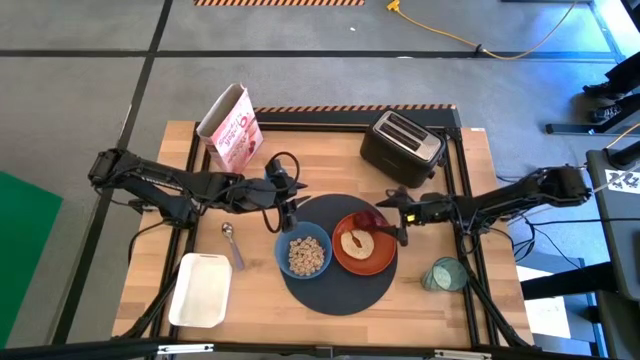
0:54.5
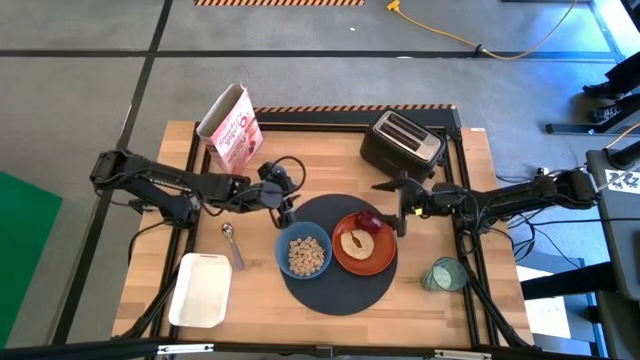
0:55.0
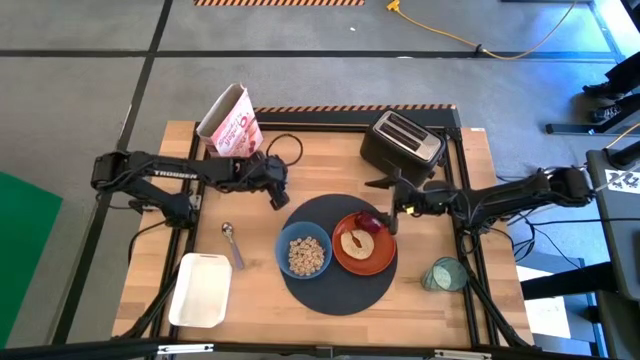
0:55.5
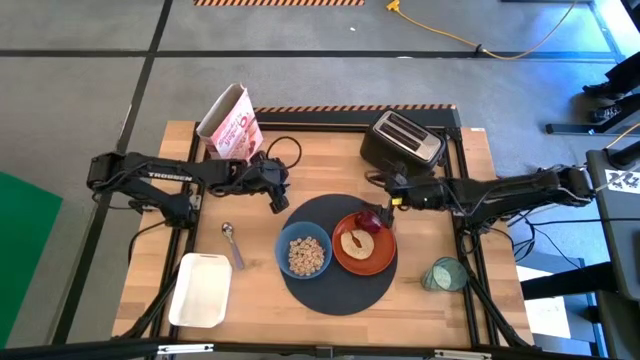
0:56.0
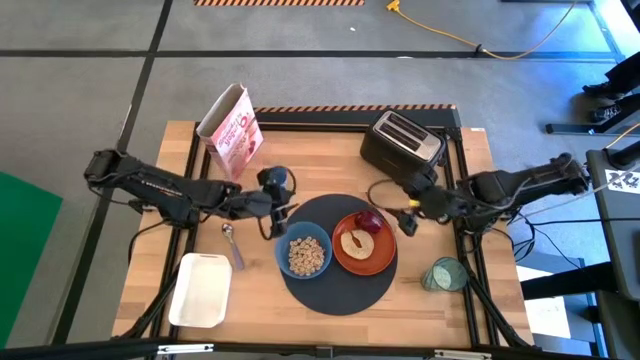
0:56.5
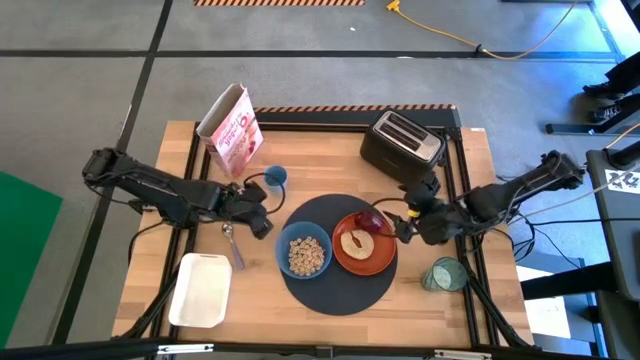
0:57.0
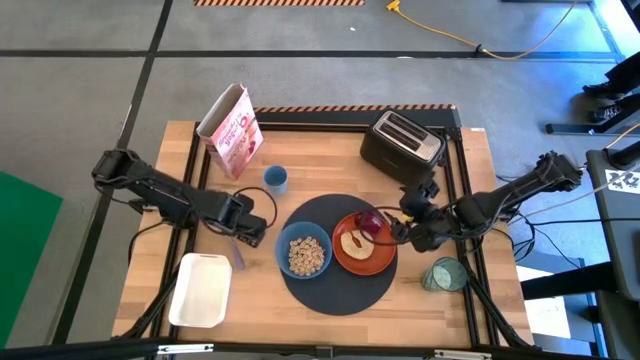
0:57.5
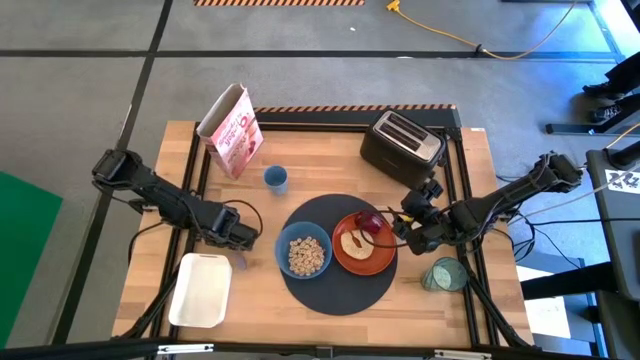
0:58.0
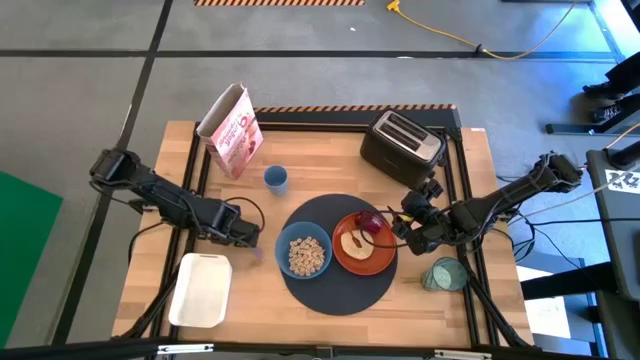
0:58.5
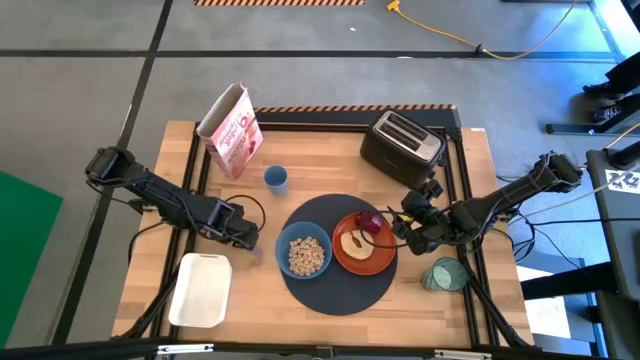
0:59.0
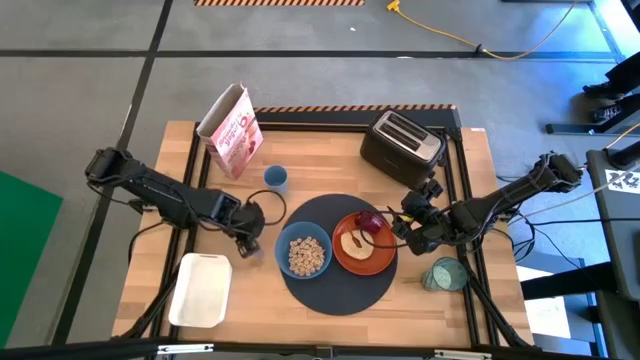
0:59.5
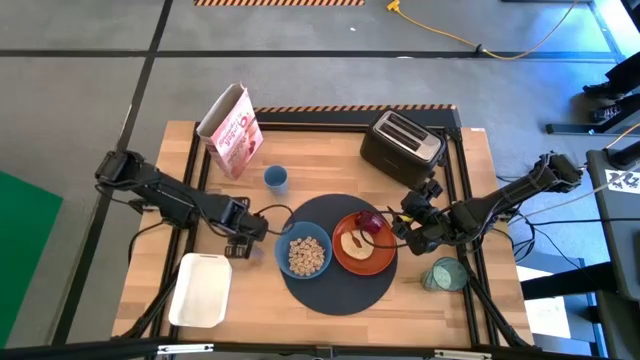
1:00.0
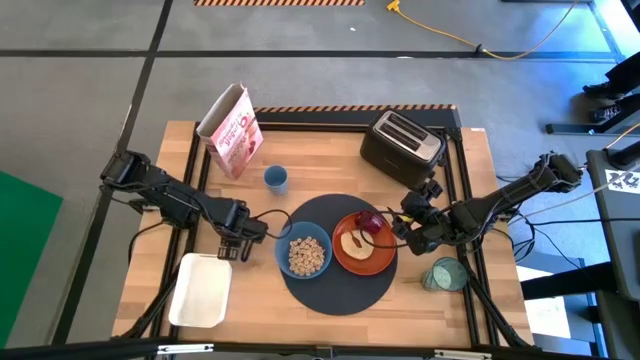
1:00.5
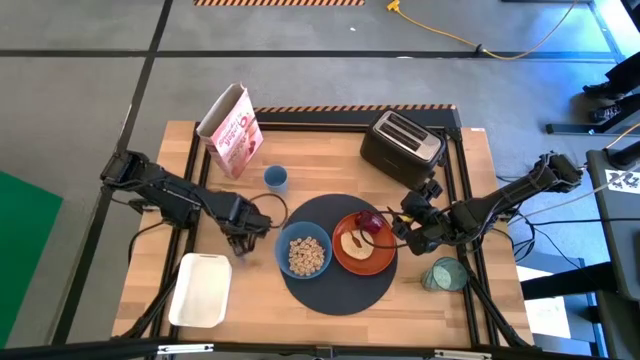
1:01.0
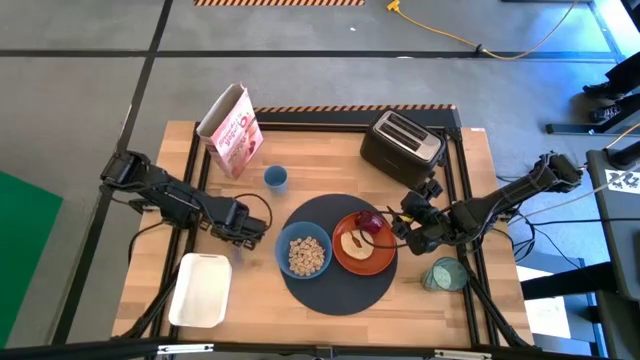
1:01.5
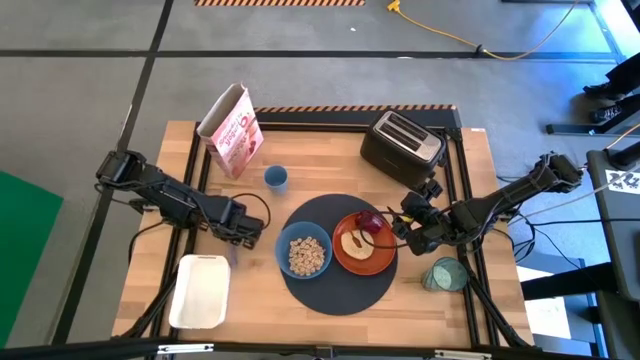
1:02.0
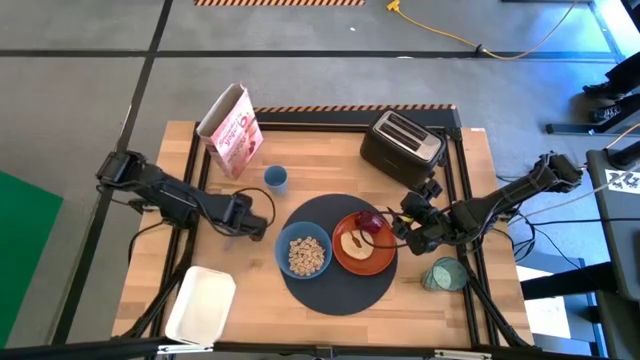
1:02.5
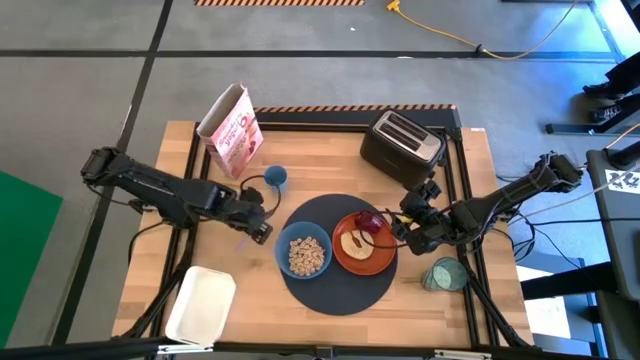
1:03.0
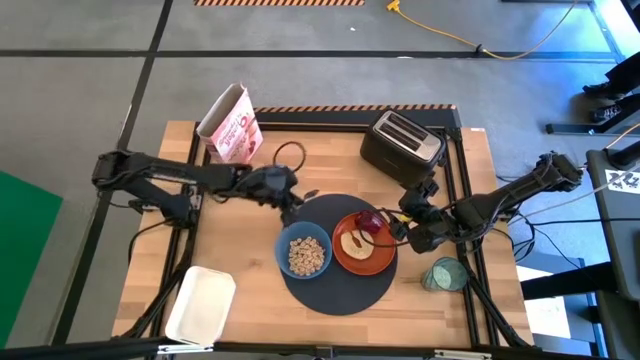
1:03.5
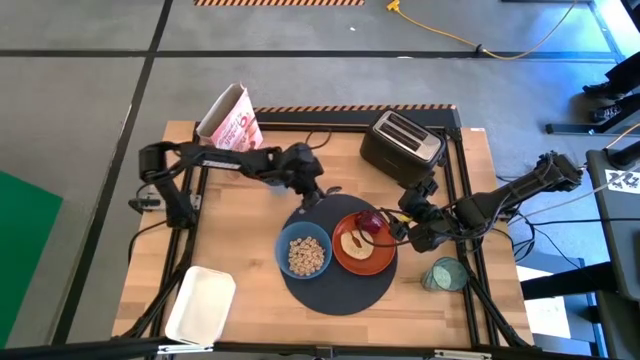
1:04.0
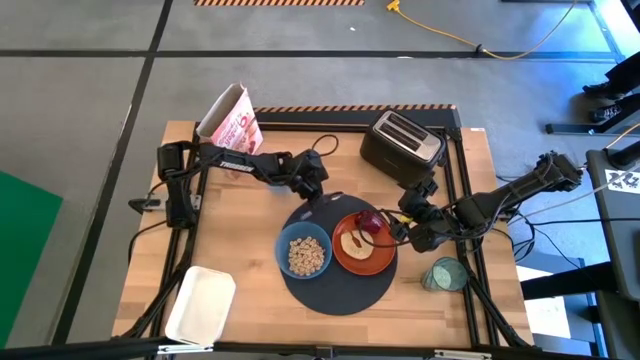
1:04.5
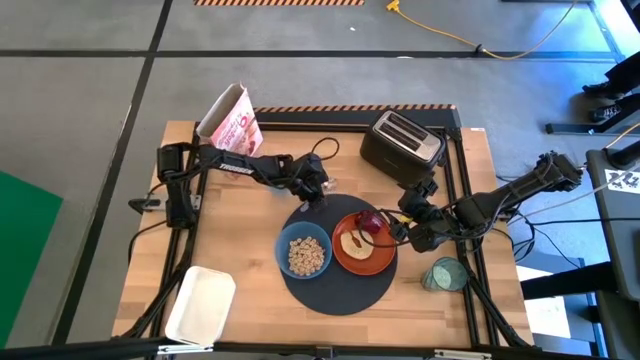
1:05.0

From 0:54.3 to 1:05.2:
Task: Arrange a breakfast setting
Put the blue spoon on the mat

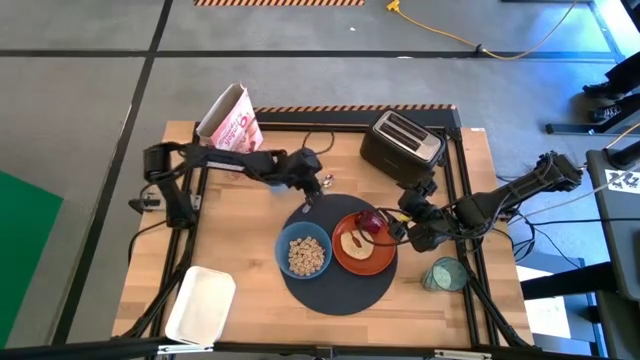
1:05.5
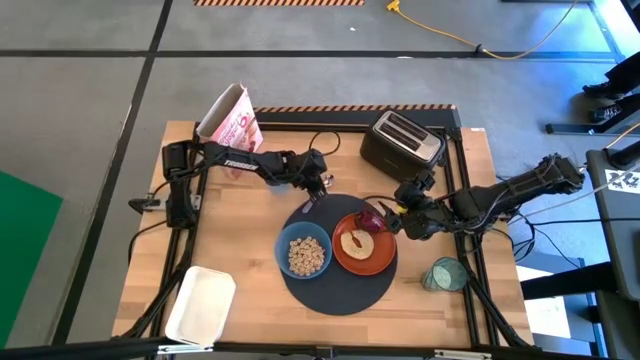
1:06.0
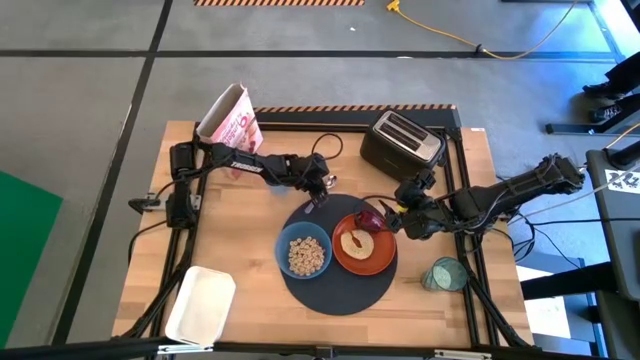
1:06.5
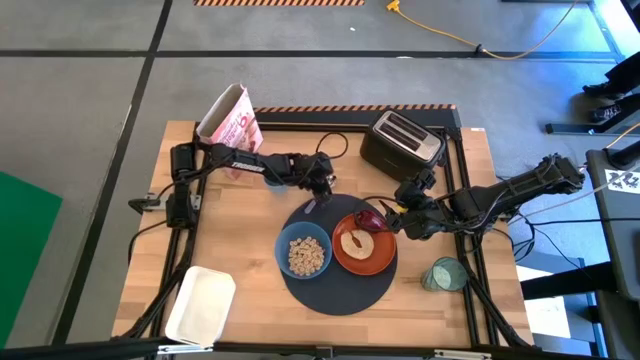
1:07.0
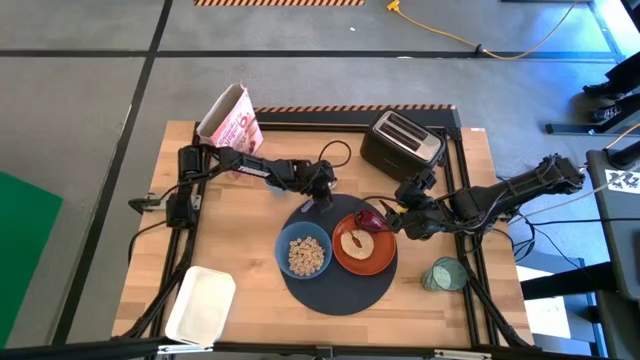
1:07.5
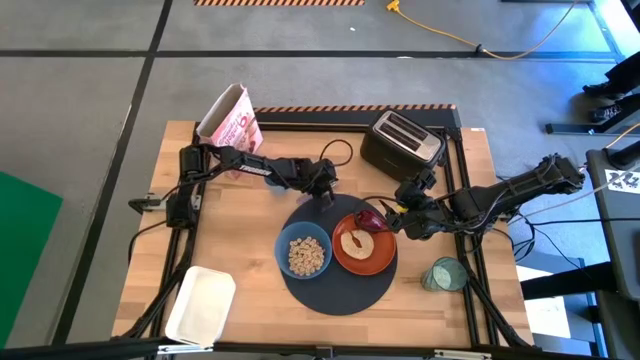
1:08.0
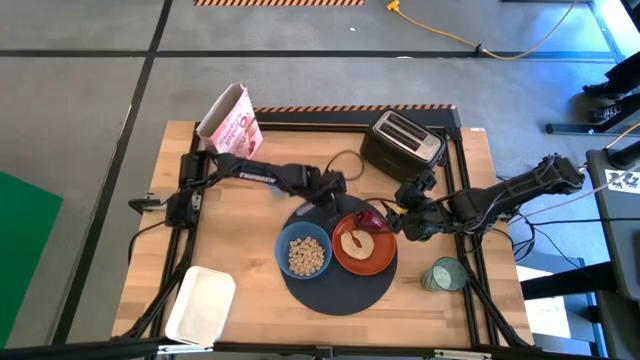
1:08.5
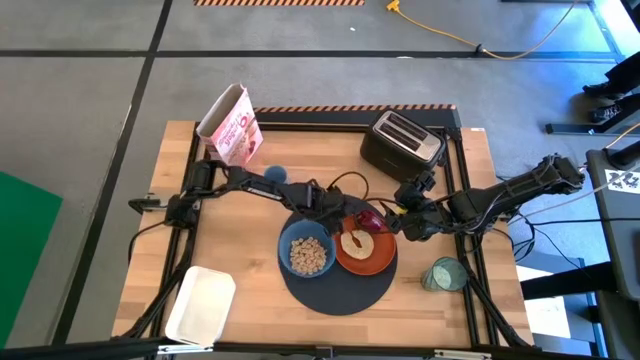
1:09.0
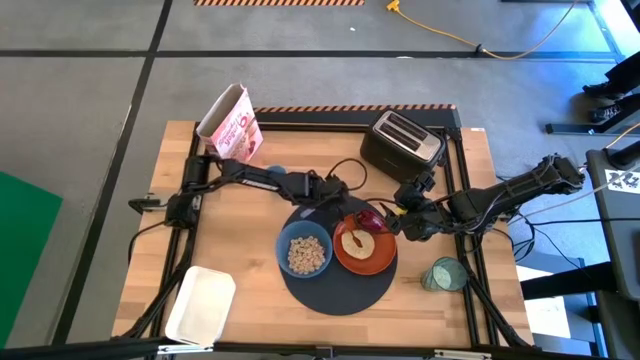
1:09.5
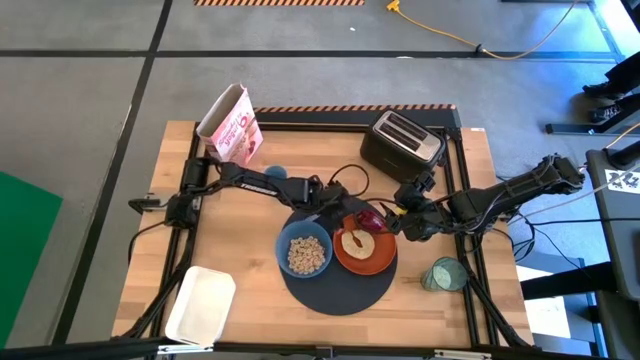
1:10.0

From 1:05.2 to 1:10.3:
Put the blue spoon on the mat

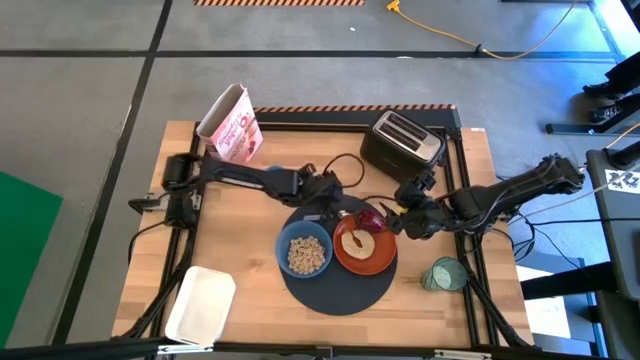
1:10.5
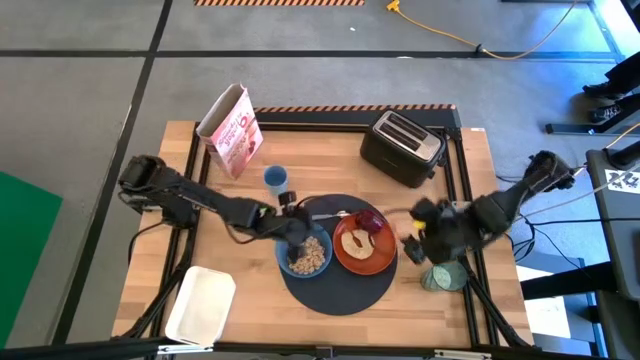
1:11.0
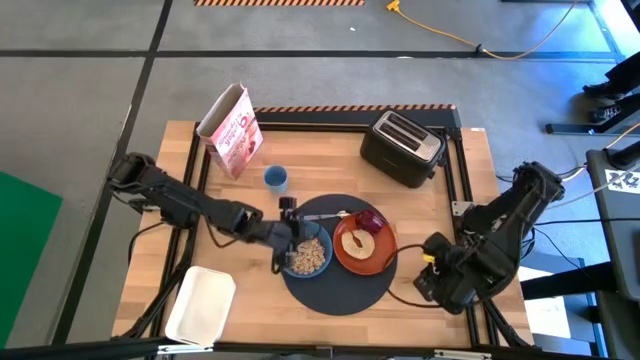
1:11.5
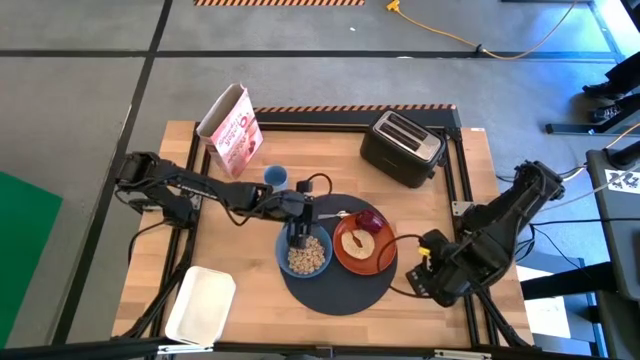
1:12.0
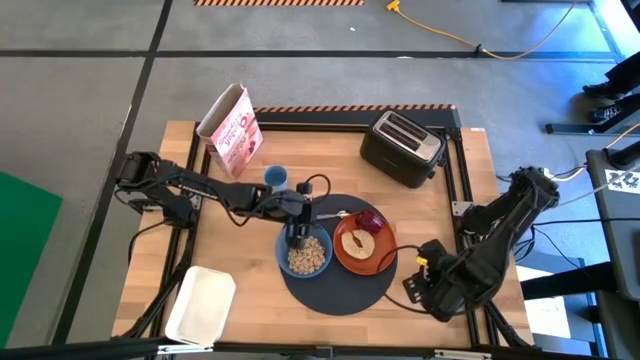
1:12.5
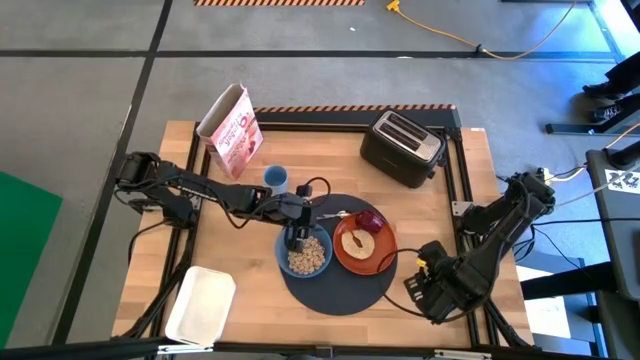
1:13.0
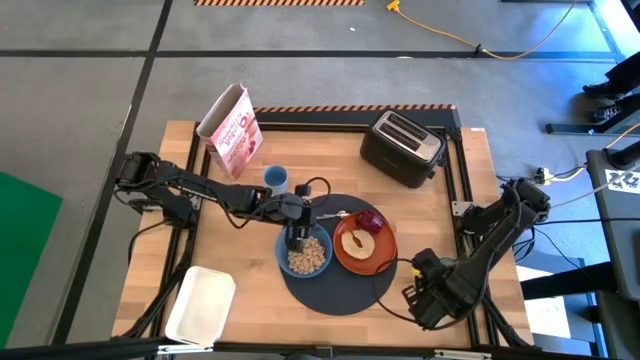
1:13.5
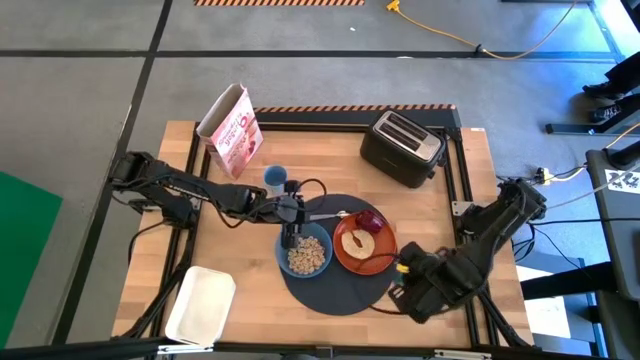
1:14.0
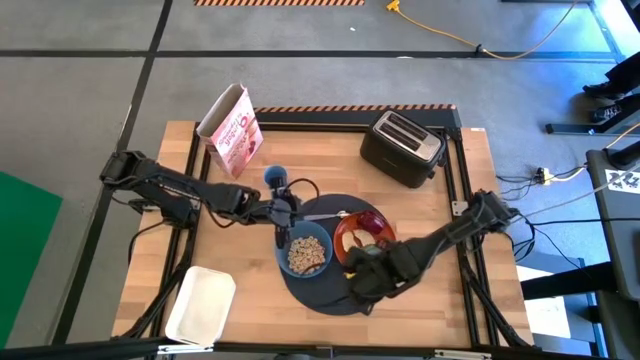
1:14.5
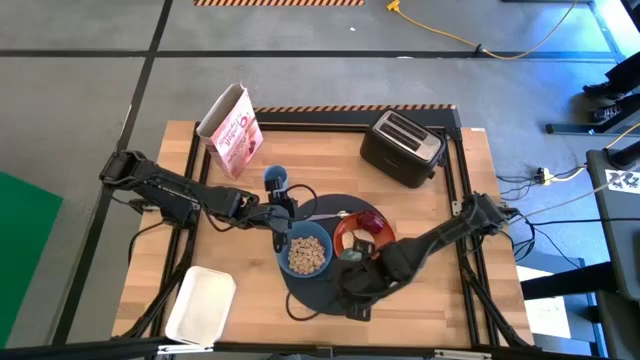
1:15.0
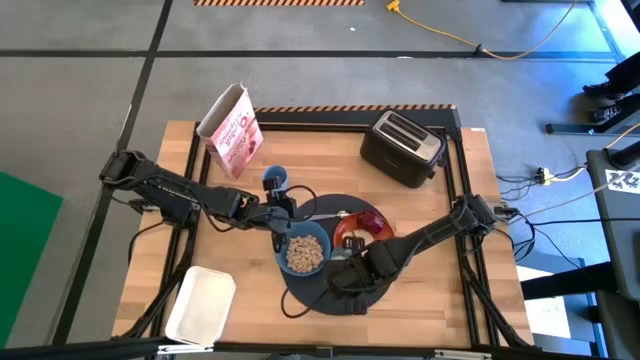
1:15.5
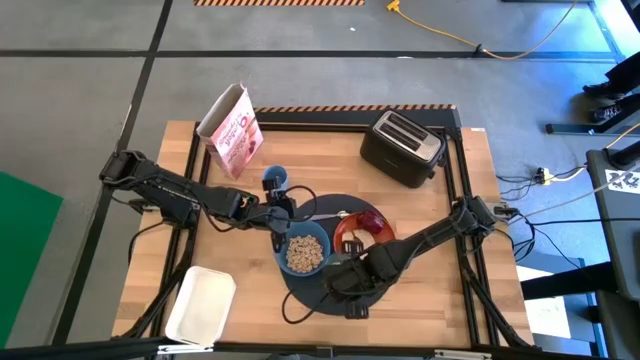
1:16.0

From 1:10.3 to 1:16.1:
Put the transparent blue glass on the mat

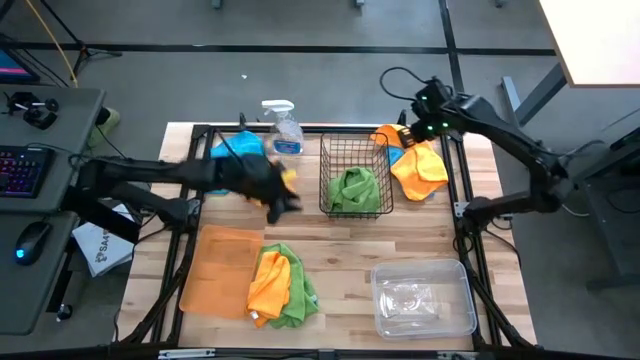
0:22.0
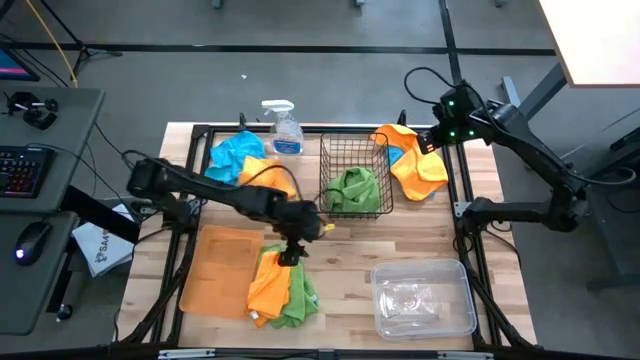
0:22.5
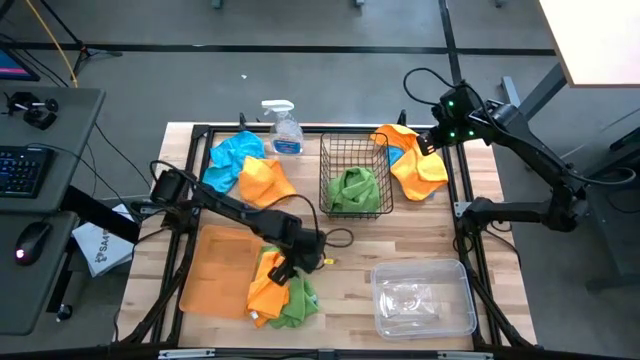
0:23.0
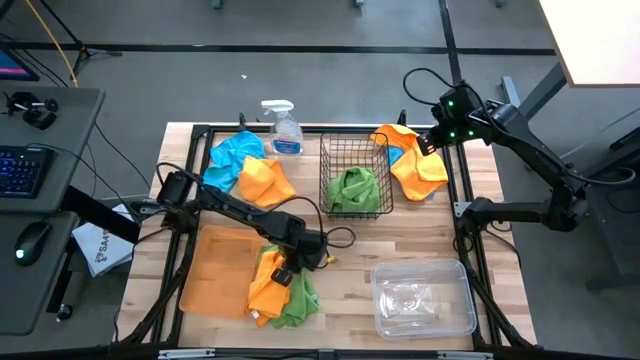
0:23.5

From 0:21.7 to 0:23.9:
Task: Sort microfiber towel by color & place in baskets
Put the green microfiber cloth into the mesh basket
